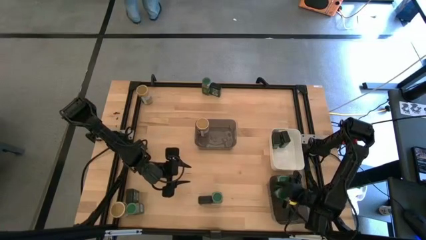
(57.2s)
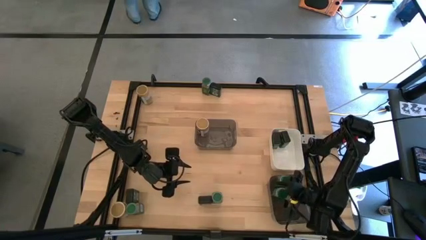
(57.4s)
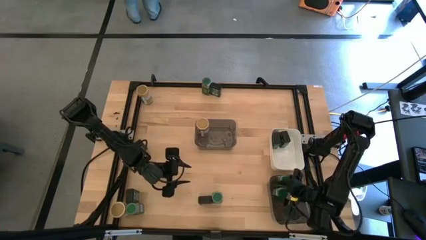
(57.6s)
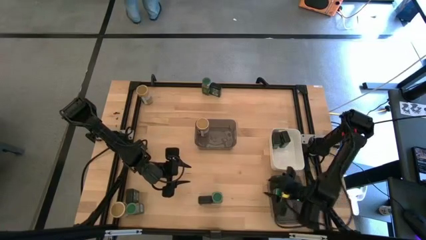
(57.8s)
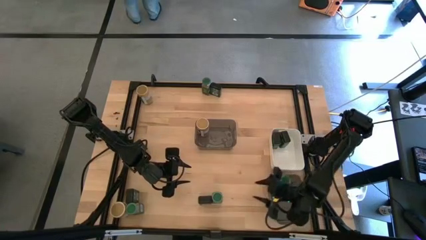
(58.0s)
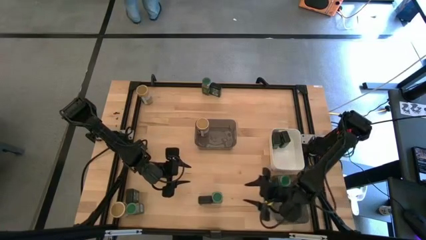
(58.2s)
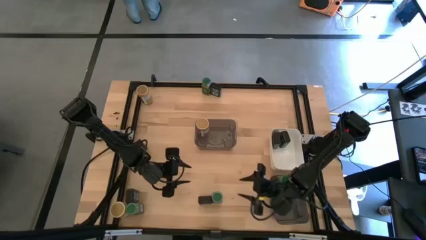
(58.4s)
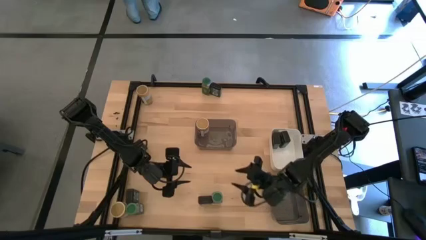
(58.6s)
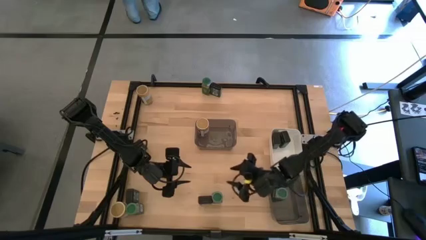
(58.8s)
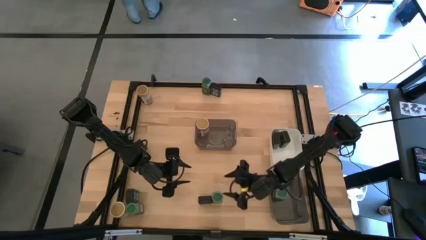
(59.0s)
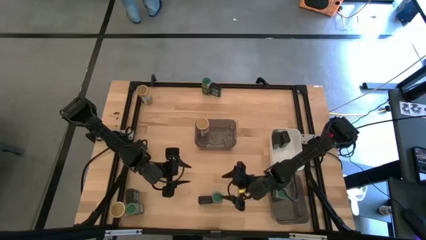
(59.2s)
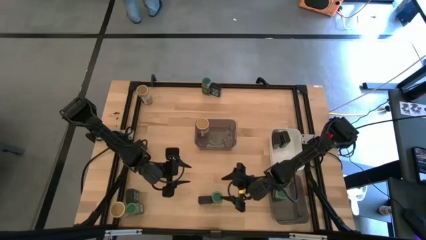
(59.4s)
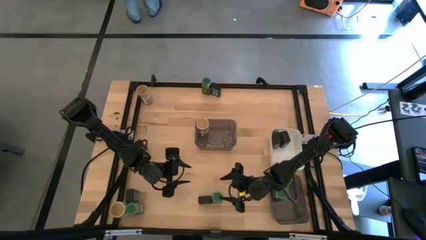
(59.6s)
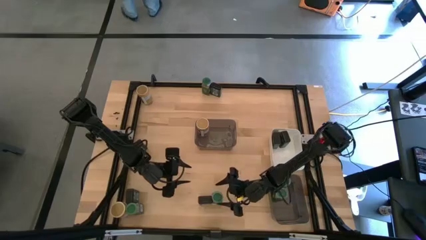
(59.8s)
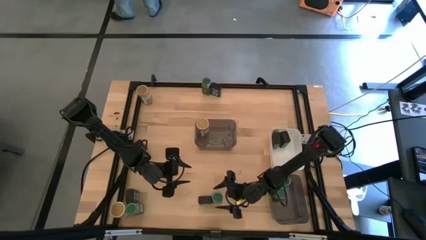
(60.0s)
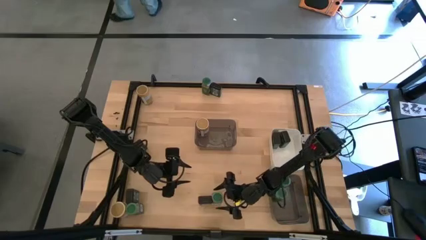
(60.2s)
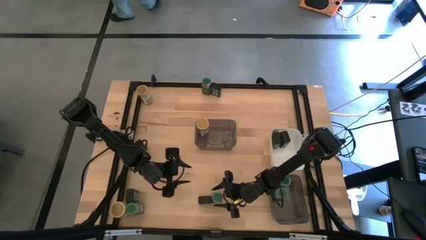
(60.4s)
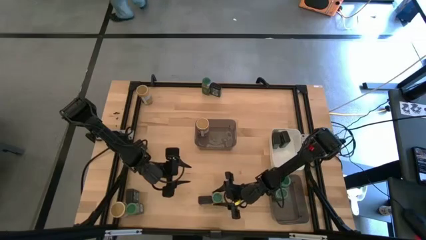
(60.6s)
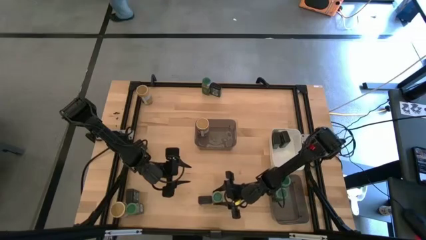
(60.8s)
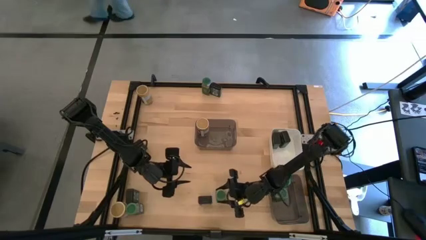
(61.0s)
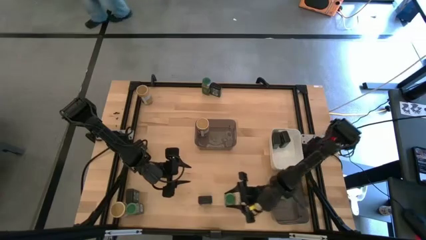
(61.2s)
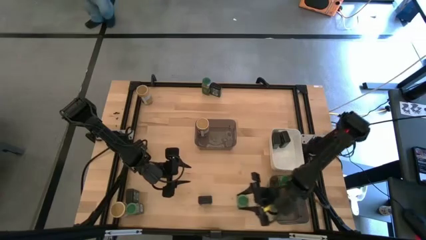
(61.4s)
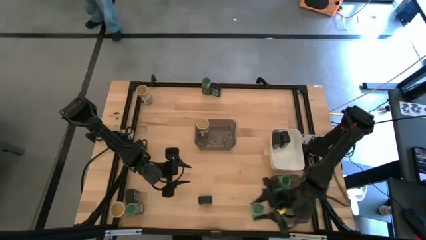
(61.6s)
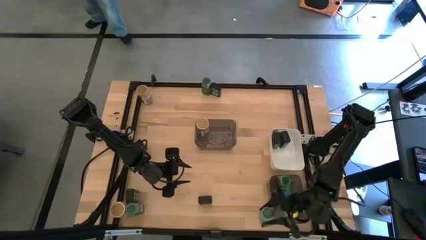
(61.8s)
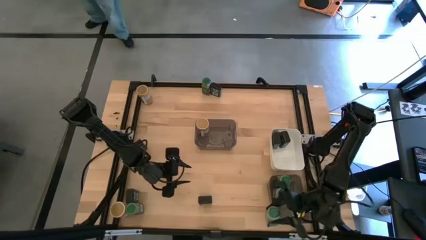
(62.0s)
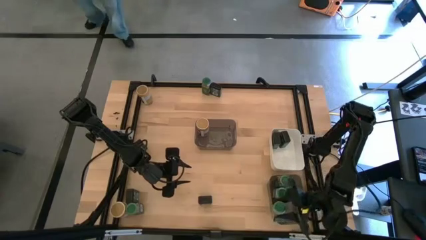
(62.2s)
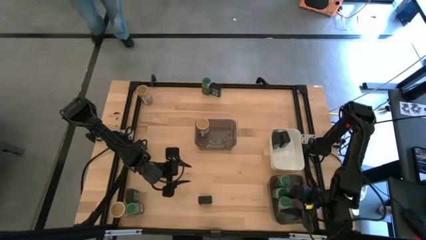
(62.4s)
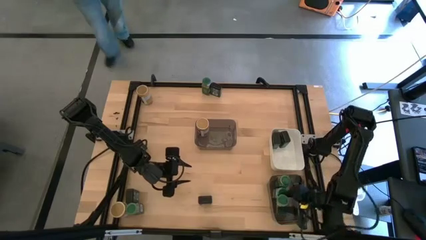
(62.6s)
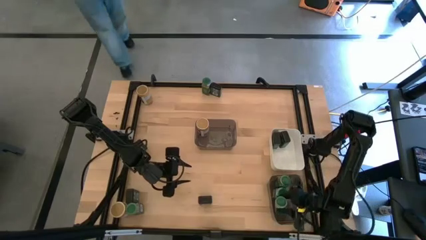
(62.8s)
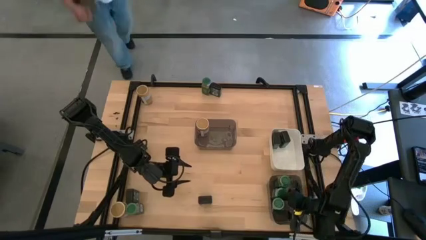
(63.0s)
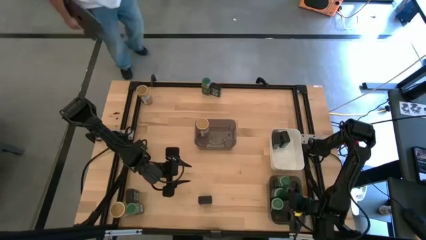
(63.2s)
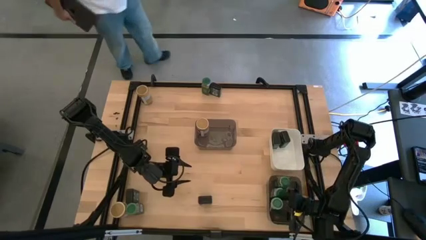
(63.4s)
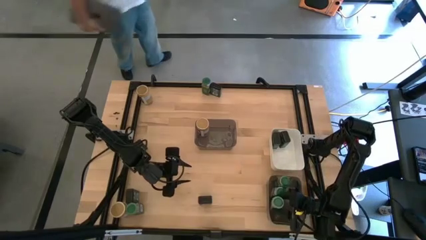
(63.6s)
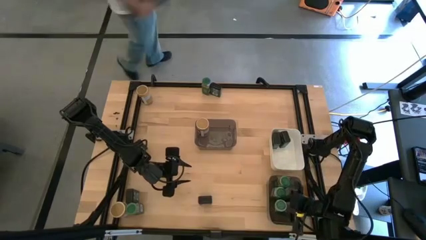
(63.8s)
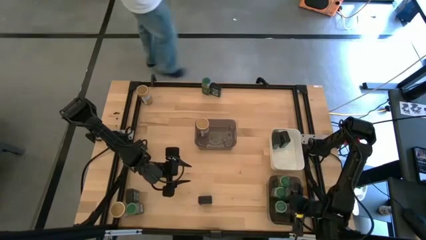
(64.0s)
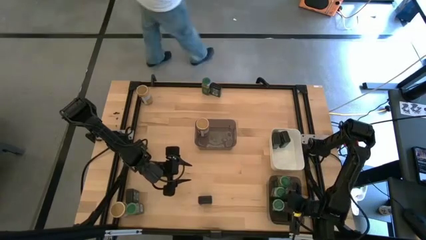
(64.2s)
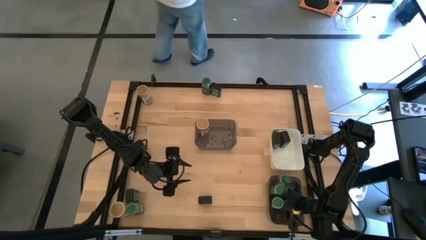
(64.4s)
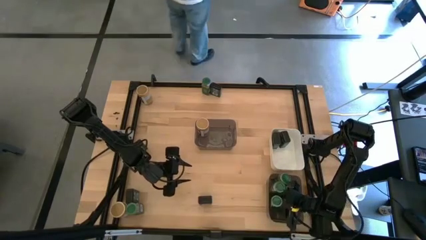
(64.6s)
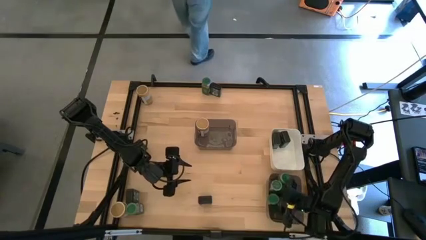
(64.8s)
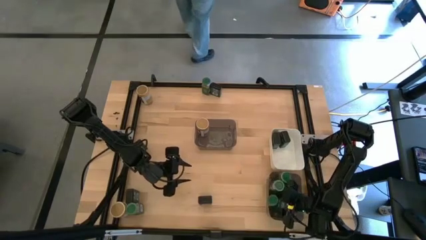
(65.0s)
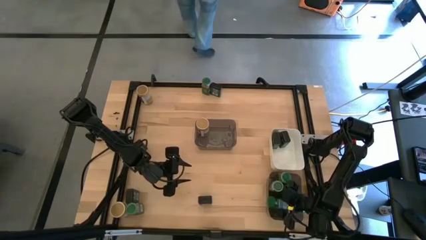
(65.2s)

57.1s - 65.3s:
Task: Sort spices by type
Put the bottom right green seasoning bottle into the bottom black bin

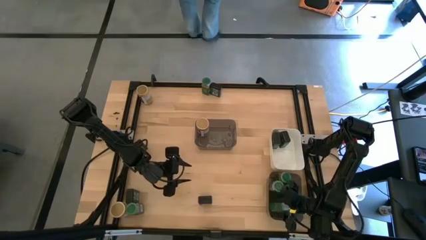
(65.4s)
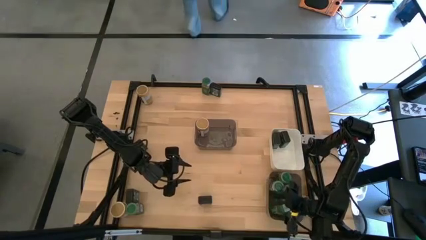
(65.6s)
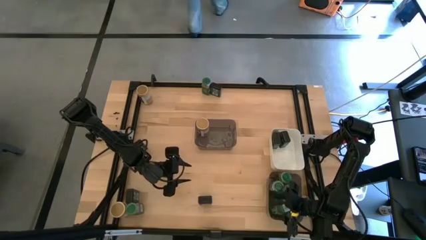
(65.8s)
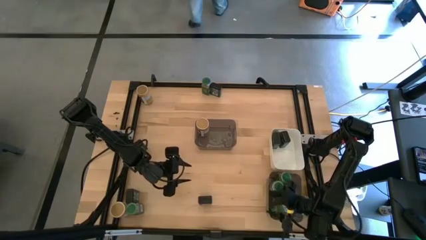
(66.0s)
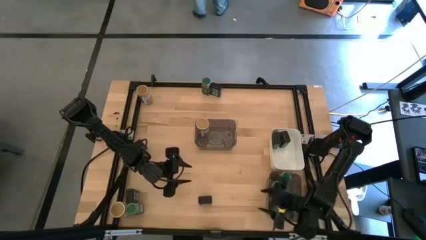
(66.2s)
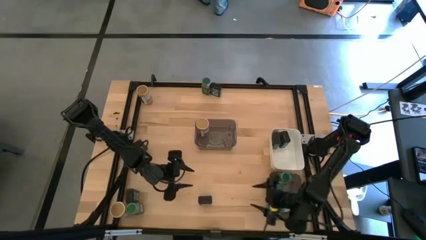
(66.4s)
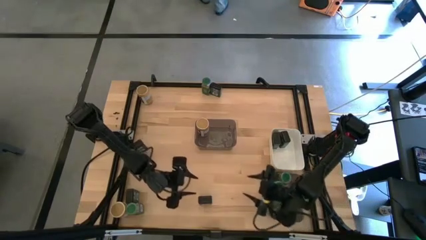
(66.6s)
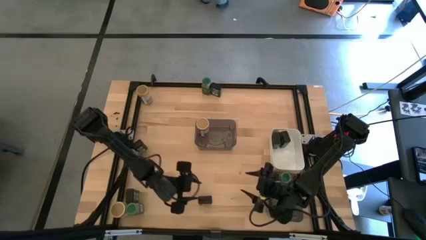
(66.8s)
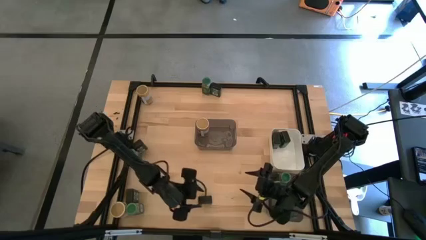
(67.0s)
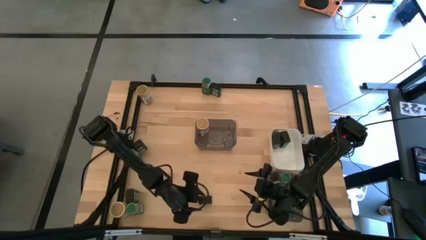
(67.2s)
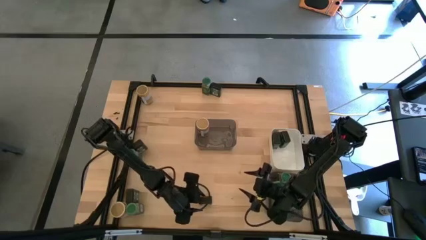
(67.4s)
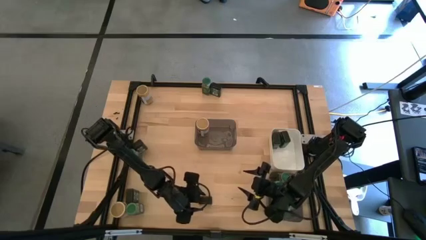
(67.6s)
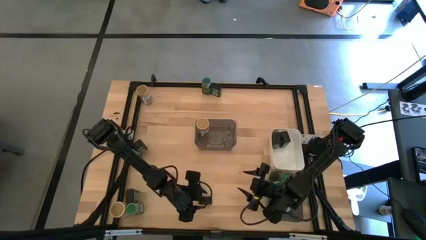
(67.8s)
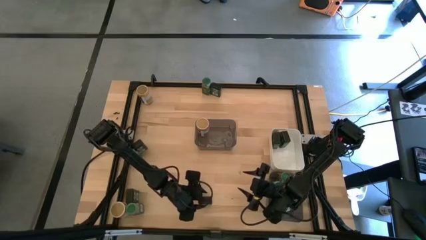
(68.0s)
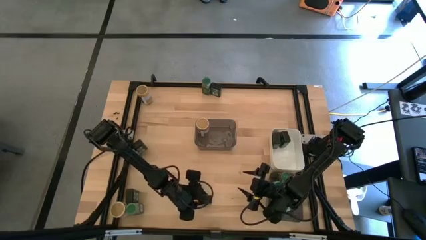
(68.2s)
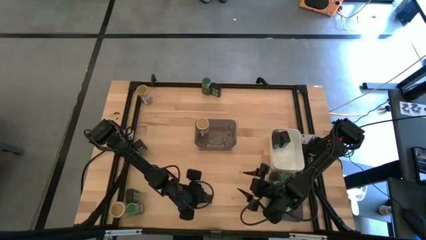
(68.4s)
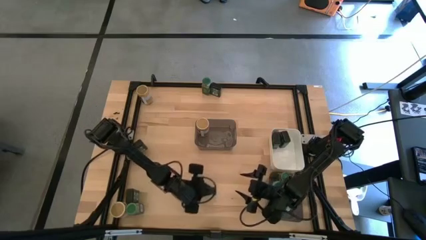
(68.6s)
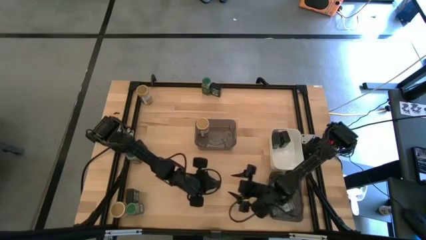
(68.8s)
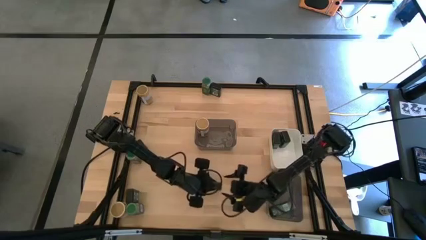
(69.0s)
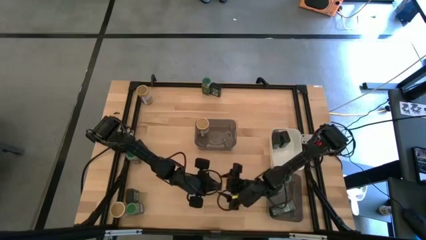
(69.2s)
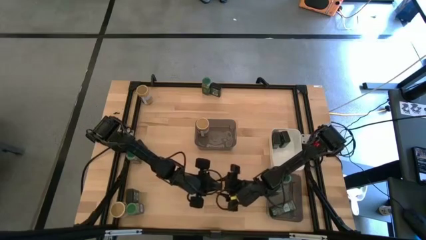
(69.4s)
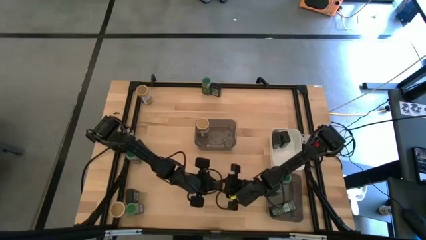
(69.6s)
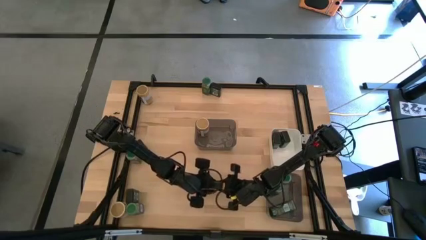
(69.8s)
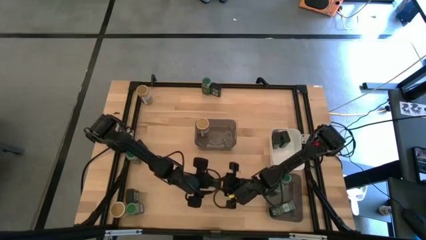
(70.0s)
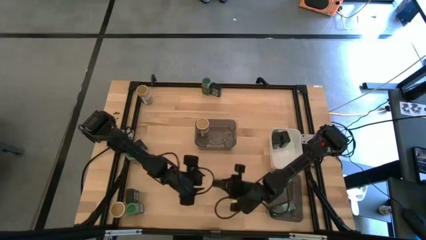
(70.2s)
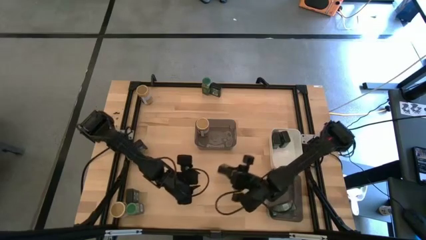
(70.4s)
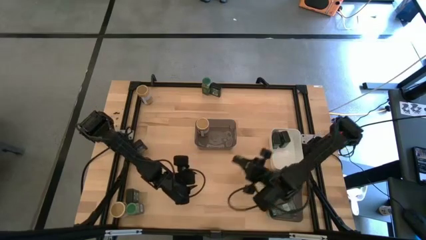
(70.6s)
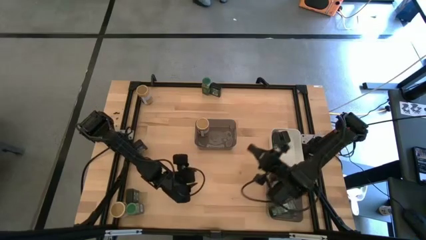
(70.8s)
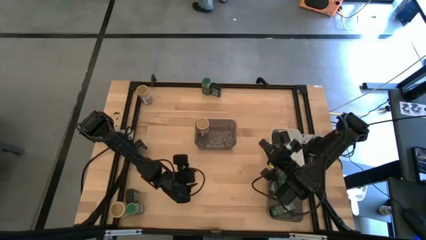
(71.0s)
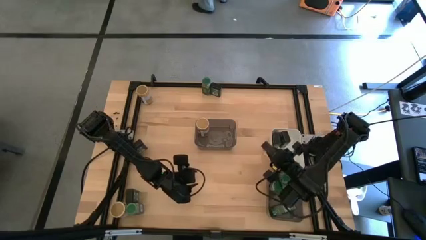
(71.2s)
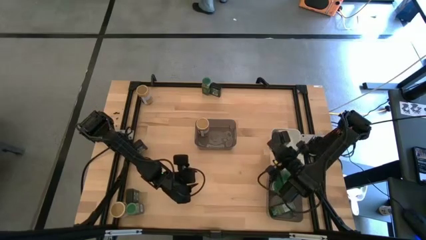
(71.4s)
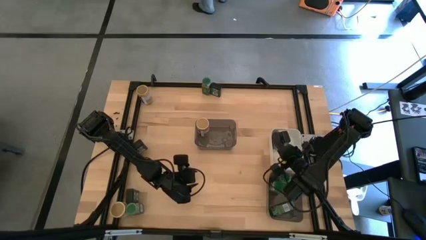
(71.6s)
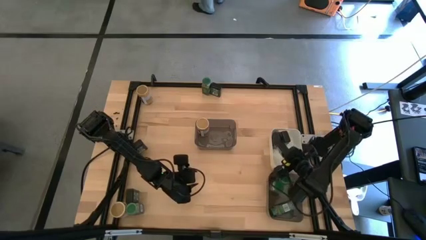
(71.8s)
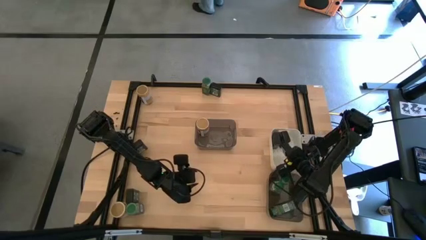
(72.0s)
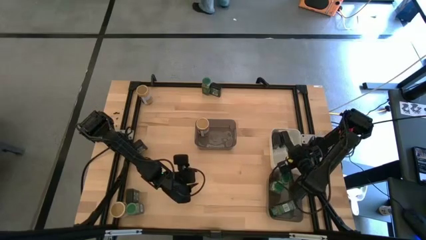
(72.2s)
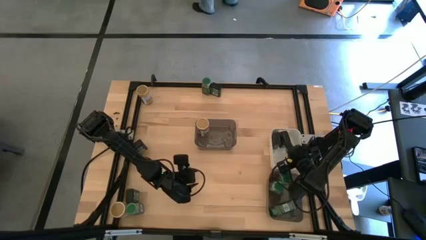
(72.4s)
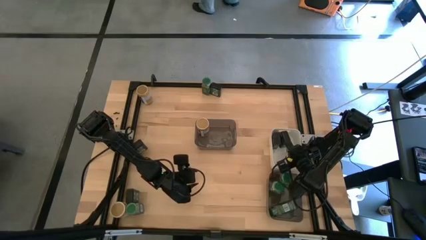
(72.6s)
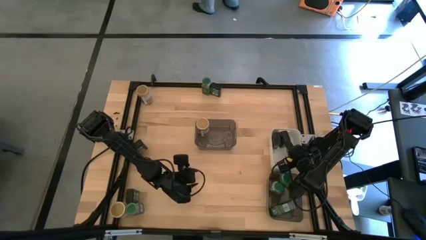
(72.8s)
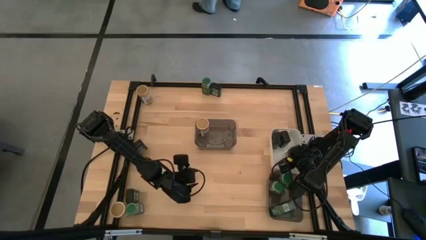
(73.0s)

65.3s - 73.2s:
Put the bottom right black seasoning can into the white bin

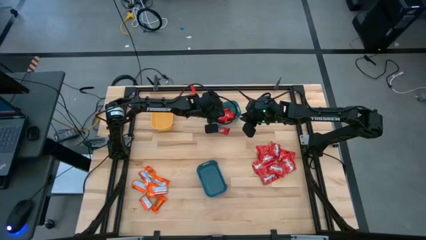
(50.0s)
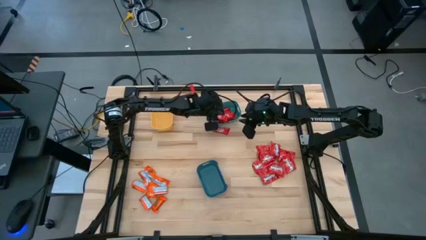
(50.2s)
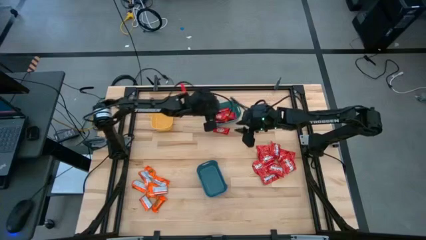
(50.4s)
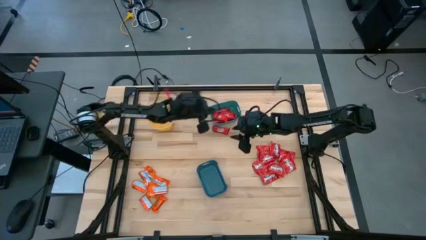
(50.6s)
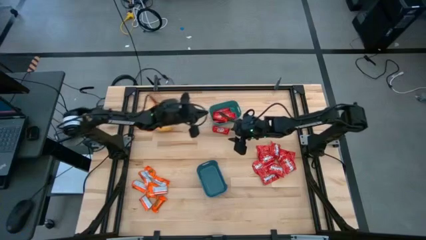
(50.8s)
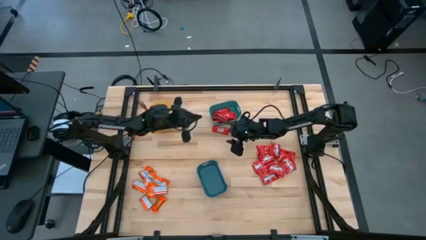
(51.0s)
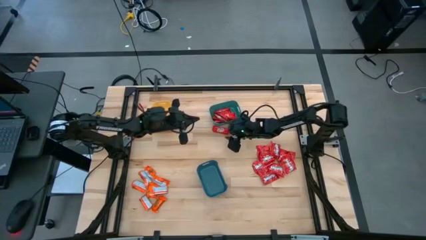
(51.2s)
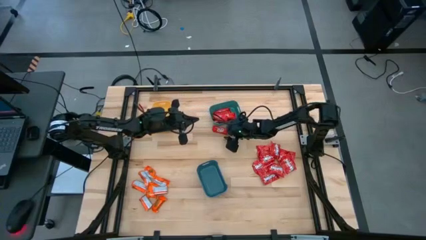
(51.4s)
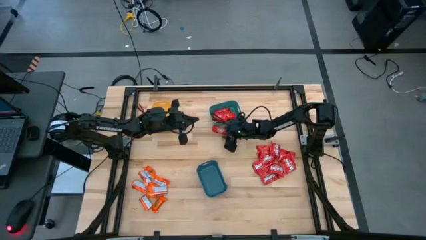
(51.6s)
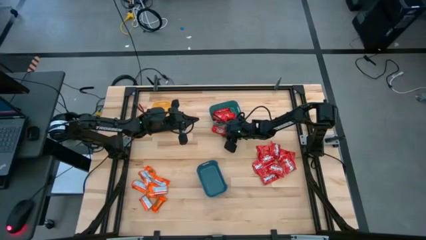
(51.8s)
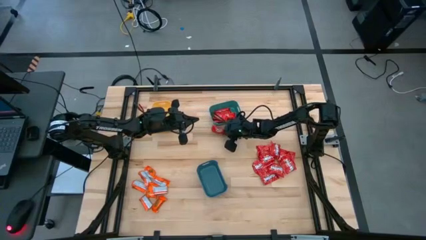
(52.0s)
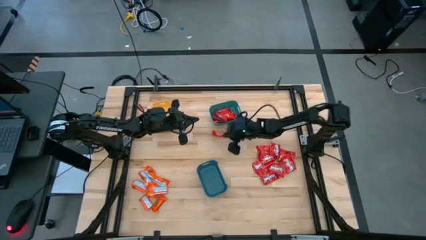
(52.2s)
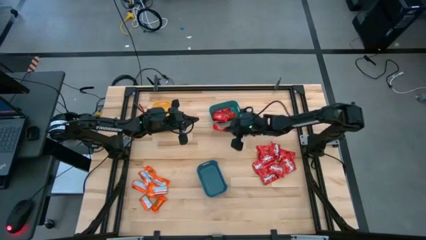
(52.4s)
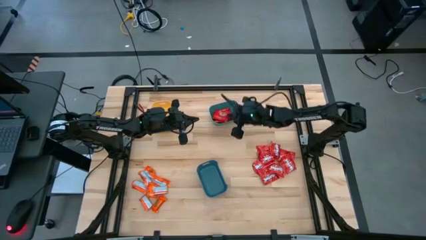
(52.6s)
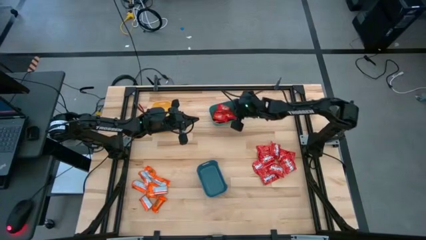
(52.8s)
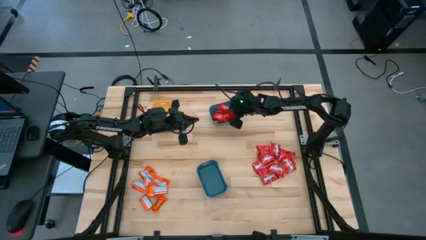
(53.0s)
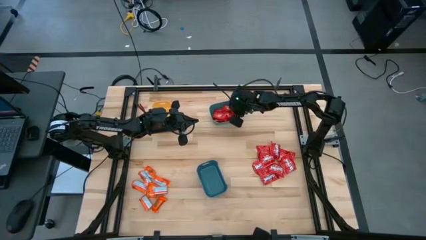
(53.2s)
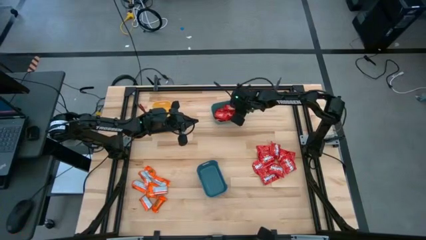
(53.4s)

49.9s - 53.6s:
Task: Sort candy
Put the red chocolate bar into the green bin
